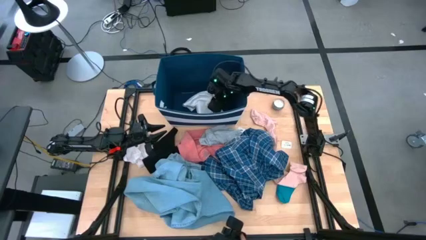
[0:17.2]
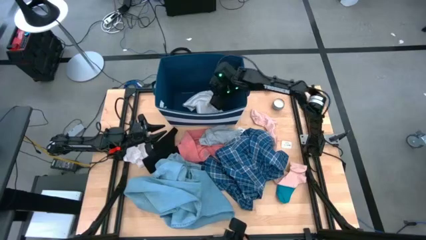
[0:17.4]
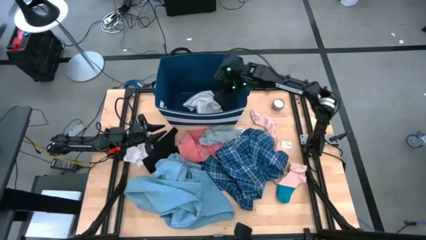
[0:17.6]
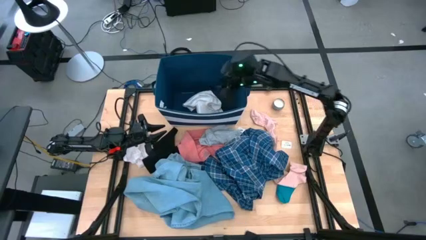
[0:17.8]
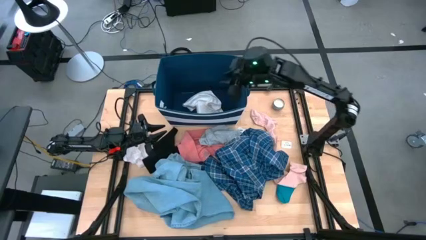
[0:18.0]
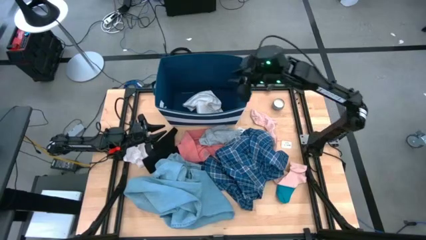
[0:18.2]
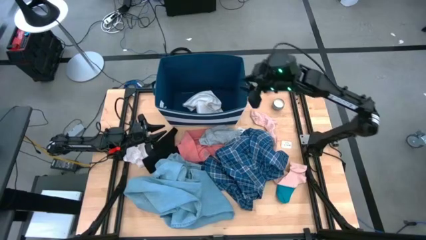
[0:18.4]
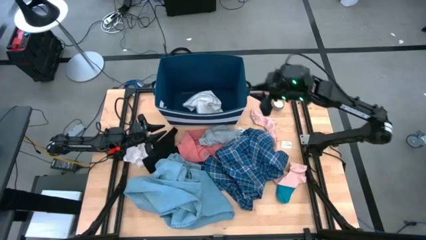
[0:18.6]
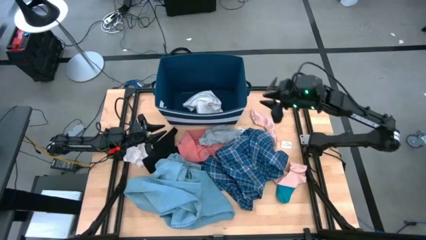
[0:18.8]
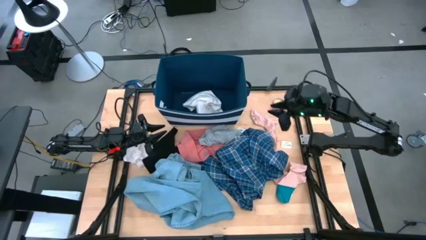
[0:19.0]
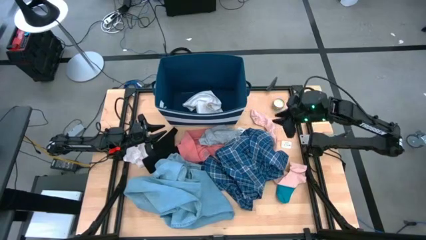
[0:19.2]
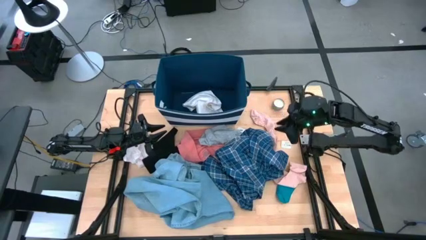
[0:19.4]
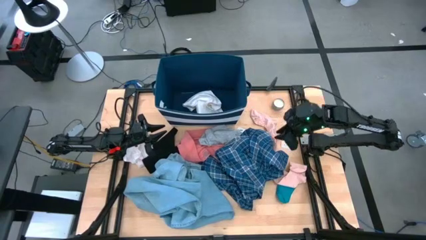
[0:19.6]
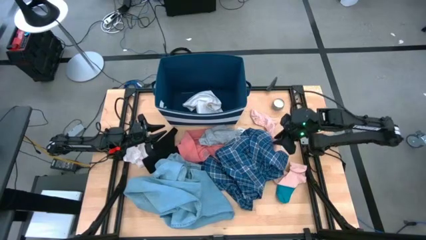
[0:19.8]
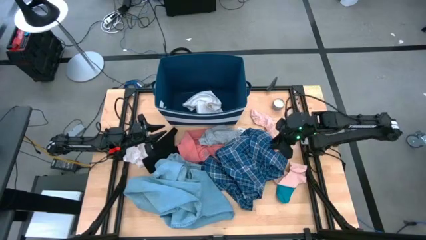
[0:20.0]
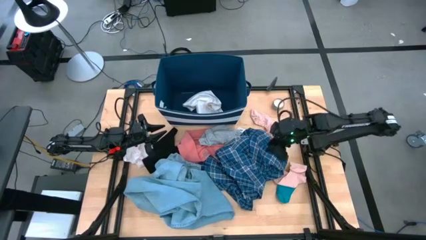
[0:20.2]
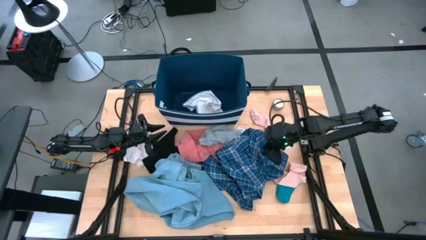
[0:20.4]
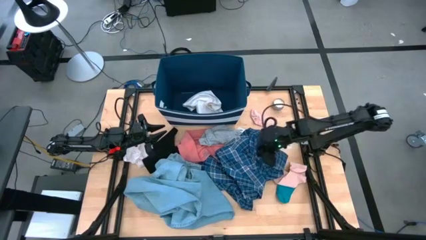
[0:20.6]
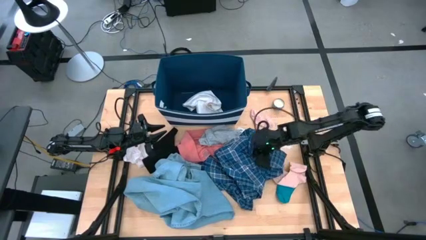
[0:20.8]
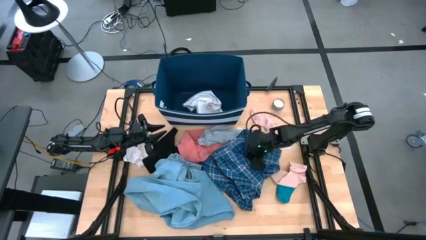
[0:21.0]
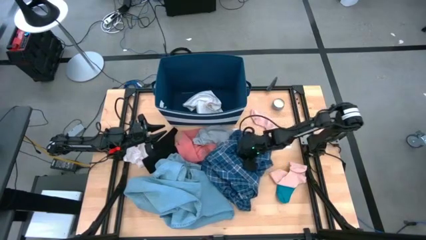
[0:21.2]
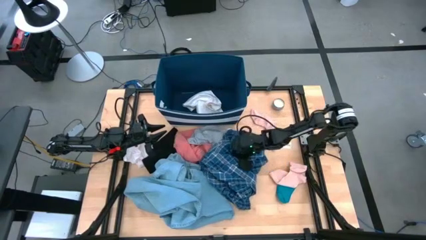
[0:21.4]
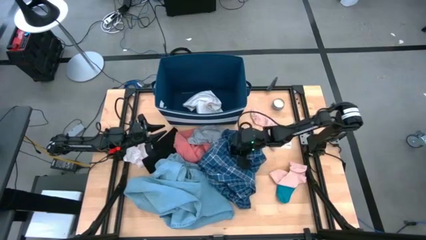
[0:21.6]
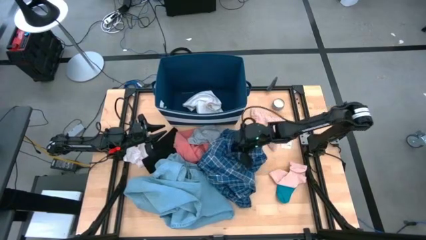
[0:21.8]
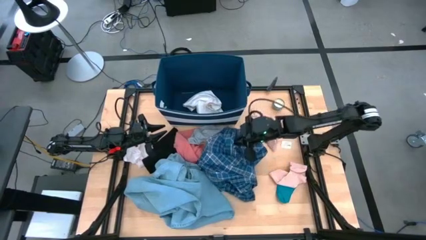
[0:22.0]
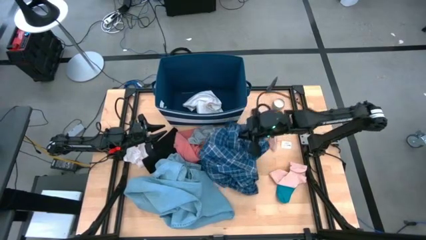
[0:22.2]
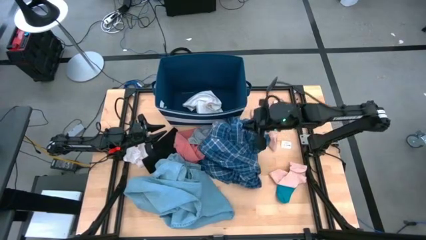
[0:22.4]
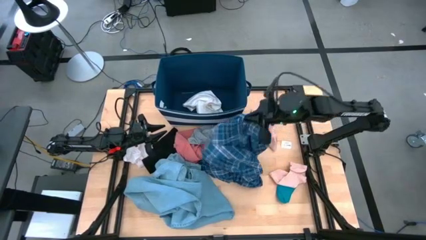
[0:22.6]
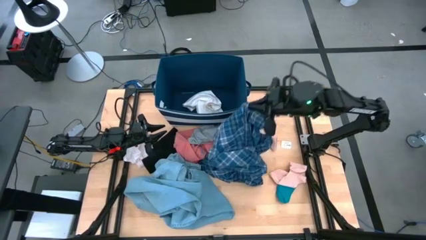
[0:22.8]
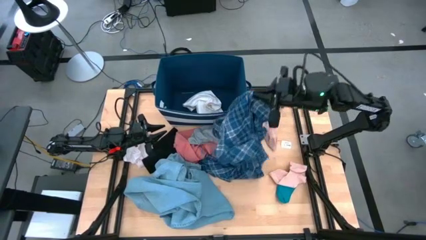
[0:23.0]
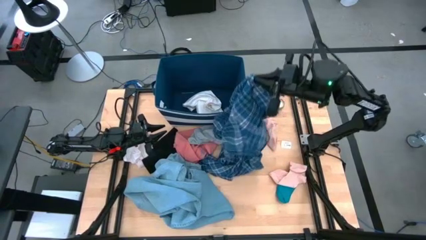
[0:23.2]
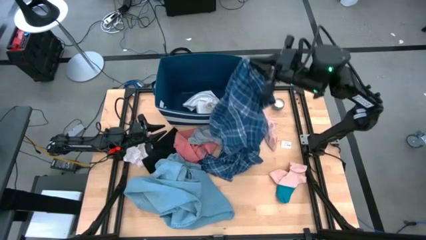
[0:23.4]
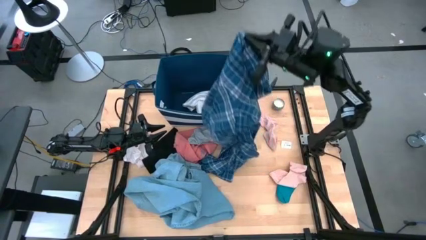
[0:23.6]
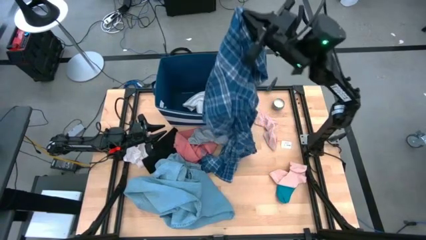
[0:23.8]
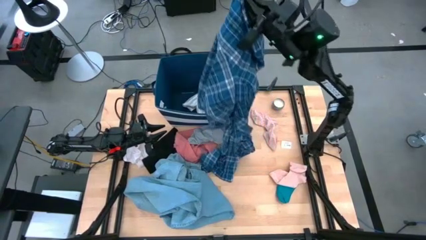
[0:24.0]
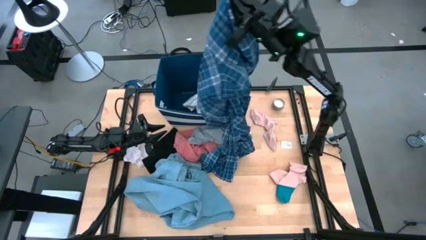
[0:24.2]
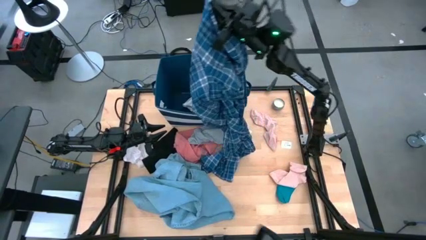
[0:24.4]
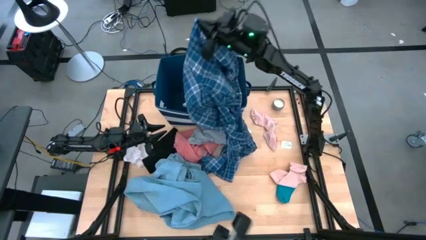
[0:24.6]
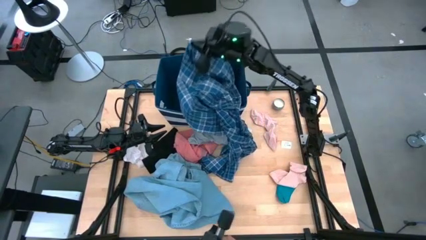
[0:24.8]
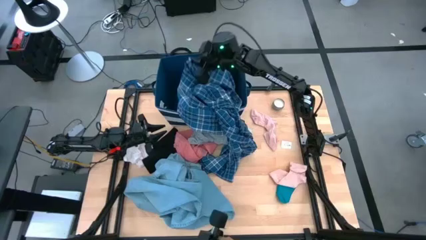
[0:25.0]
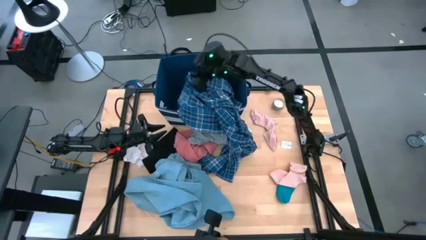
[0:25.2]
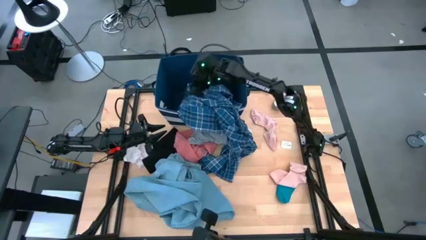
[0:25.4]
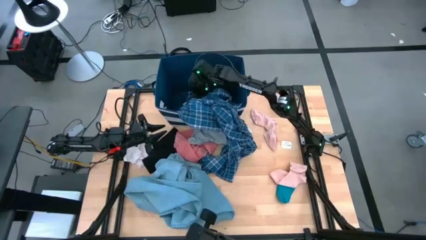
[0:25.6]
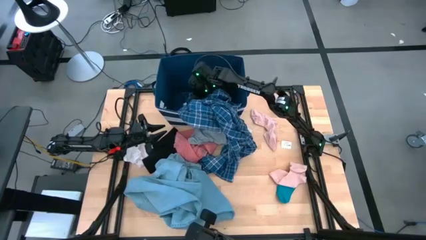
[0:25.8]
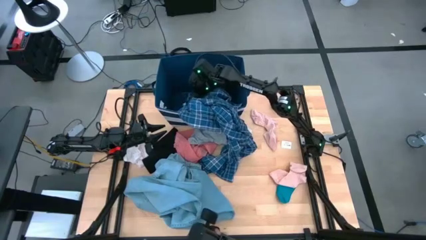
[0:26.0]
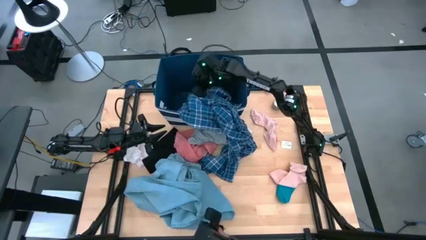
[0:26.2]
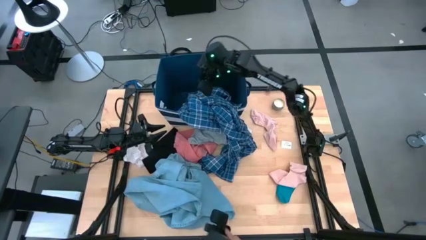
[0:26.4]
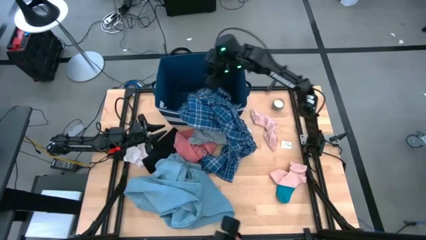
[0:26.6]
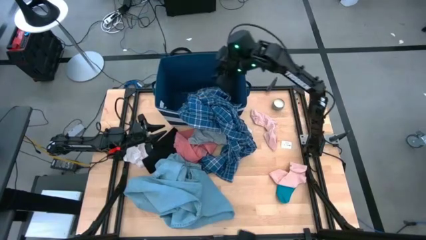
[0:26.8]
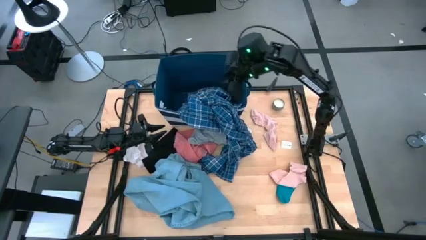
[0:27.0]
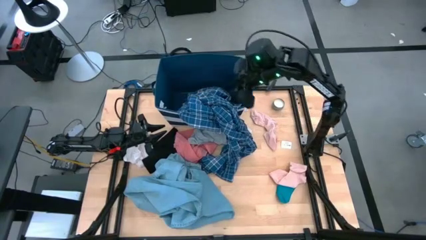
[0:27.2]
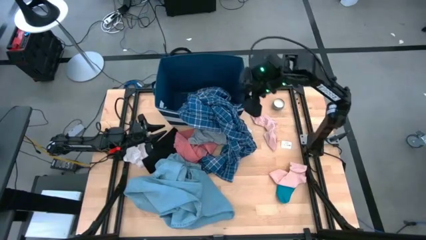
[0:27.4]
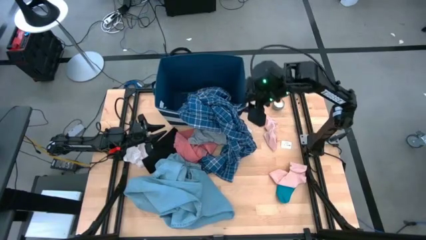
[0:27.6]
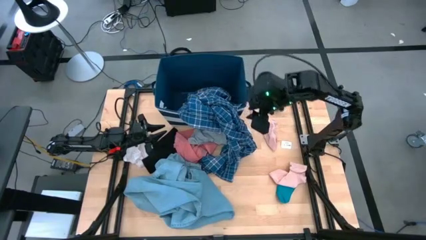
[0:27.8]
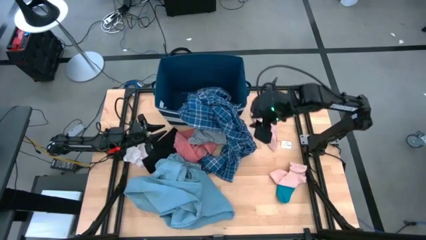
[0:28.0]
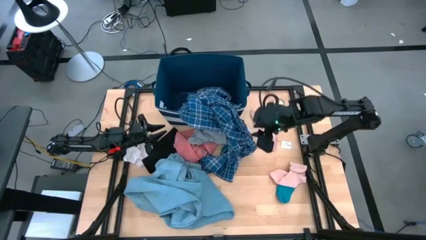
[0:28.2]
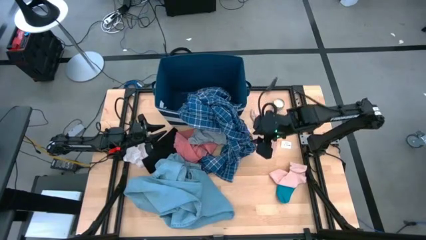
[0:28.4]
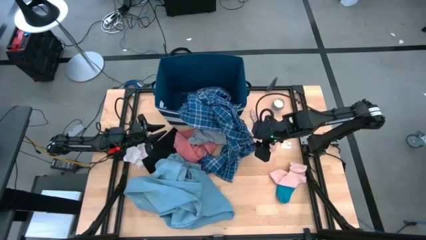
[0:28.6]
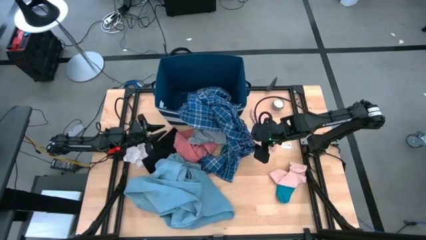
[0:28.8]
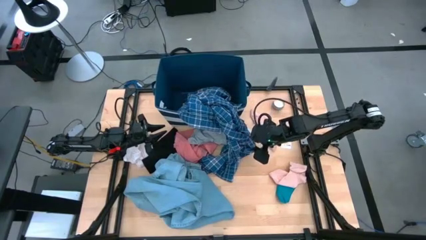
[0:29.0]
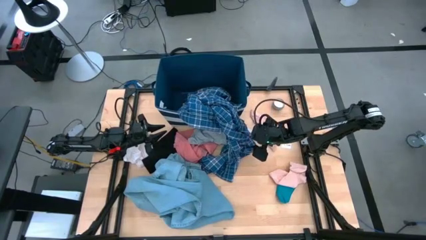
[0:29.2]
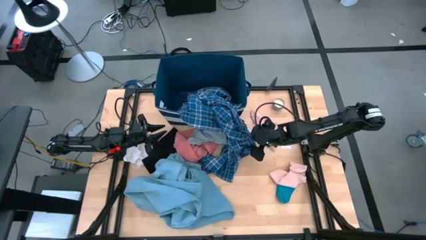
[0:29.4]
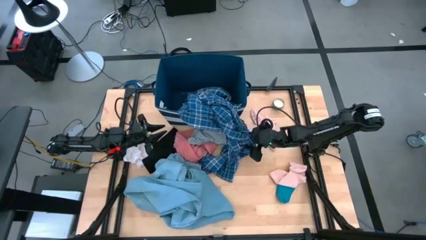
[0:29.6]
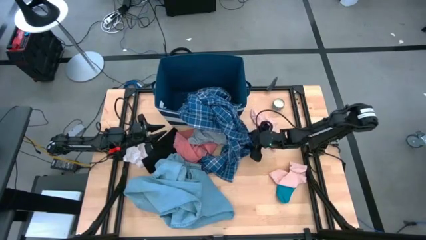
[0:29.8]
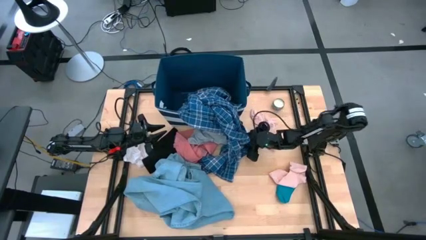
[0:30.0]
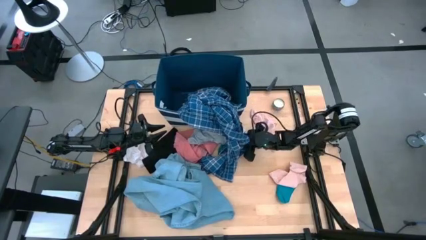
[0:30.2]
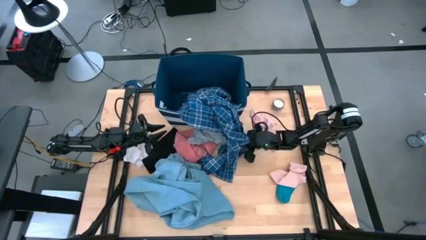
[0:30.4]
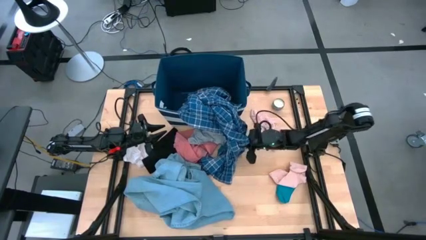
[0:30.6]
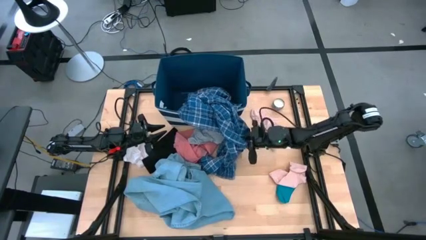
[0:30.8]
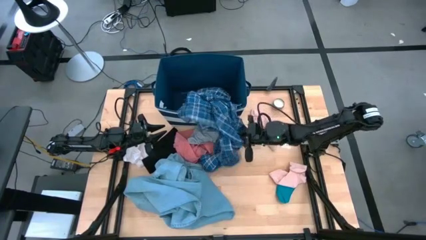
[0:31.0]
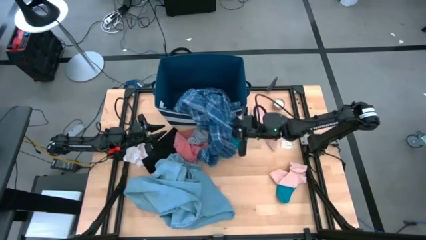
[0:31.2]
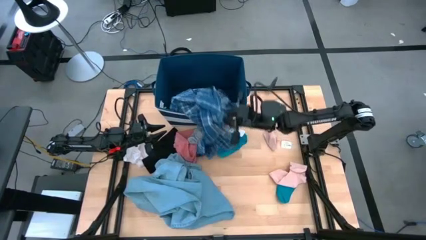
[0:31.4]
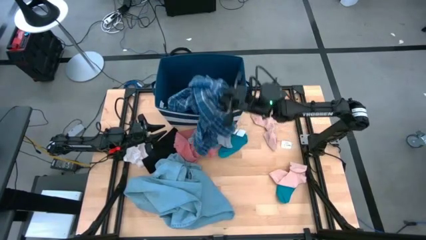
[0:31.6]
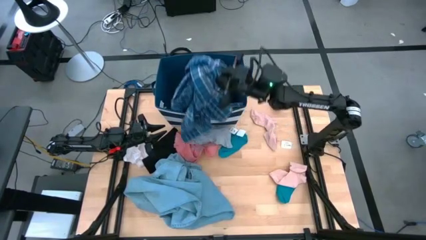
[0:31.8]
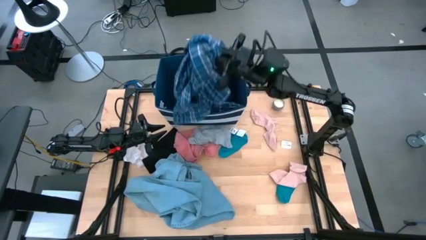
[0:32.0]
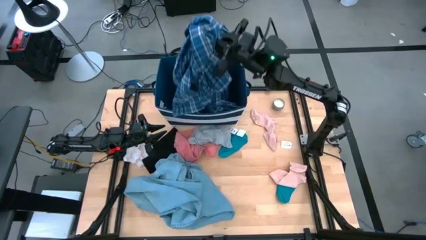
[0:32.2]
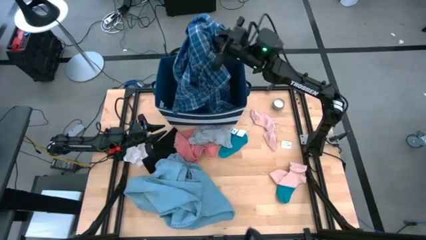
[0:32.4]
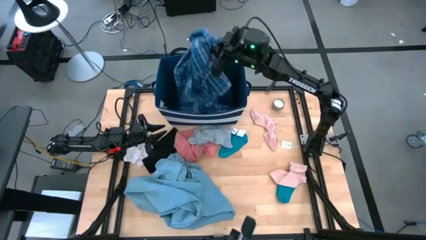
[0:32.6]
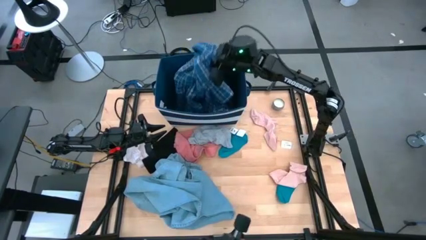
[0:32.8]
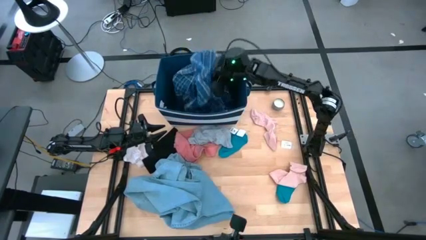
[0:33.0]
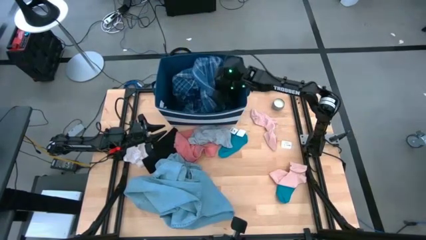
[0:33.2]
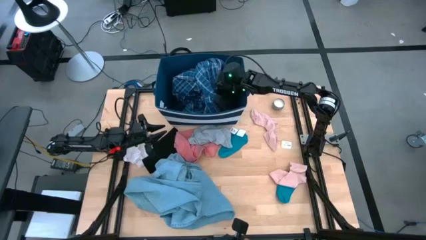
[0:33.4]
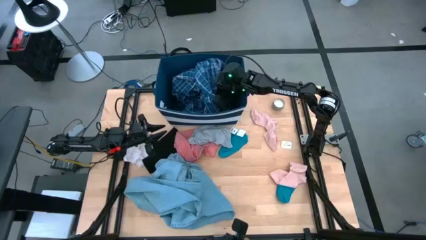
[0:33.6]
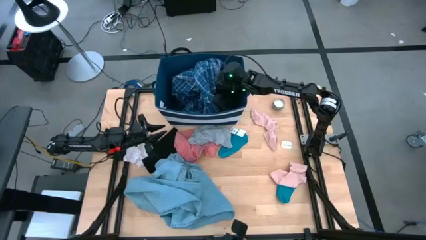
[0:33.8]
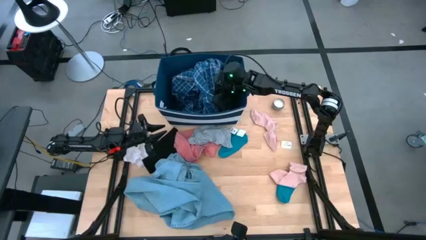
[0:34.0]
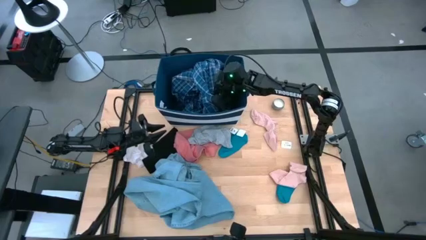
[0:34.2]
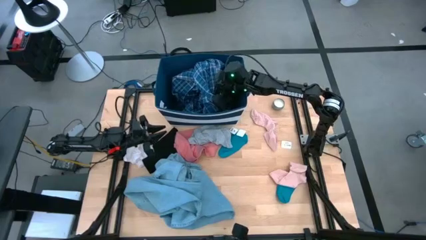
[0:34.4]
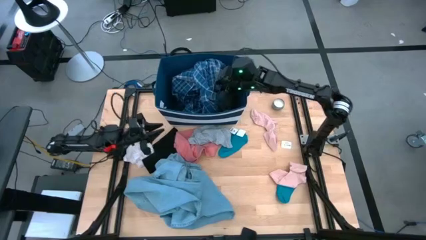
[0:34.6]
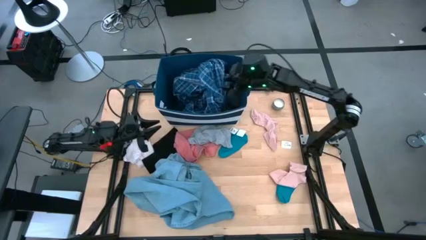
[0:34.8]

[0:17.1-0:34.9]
Task: Sort clothes
Put the blue pajamas into the blue bin
